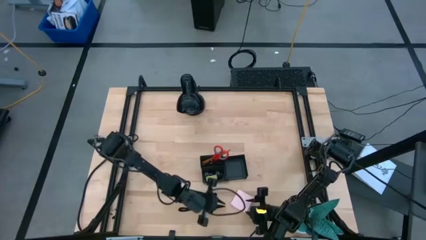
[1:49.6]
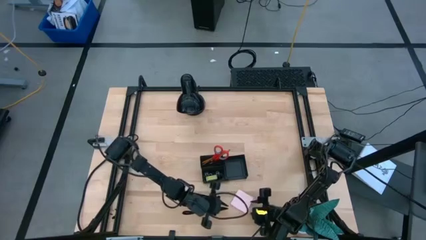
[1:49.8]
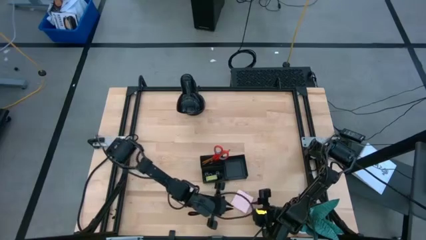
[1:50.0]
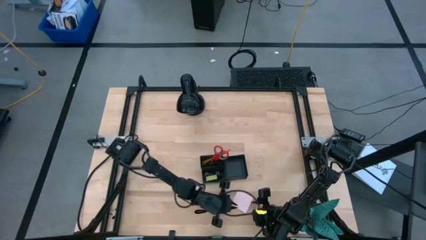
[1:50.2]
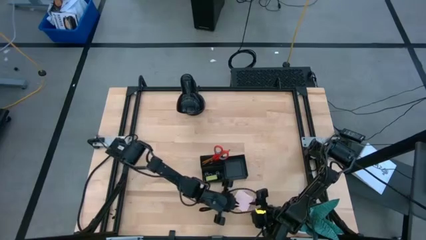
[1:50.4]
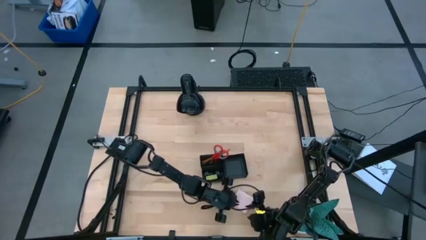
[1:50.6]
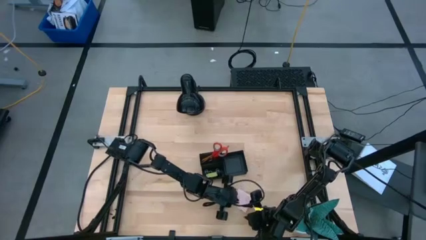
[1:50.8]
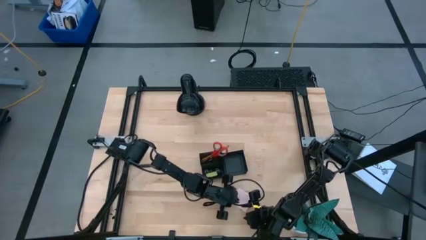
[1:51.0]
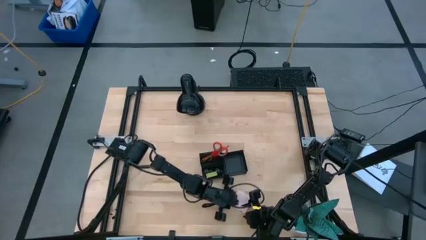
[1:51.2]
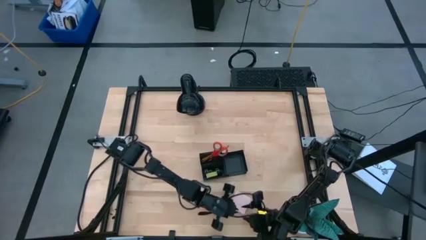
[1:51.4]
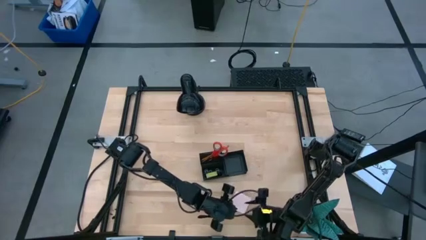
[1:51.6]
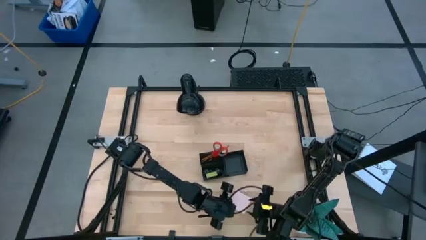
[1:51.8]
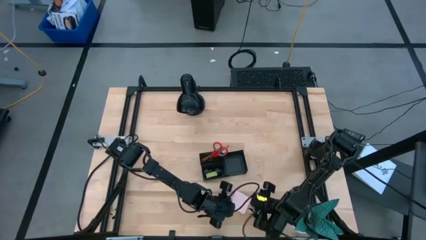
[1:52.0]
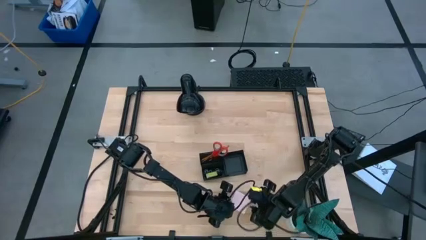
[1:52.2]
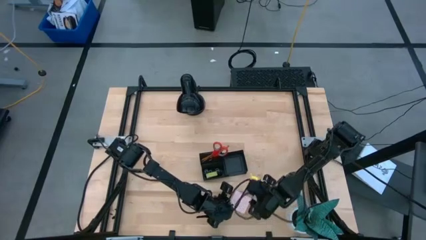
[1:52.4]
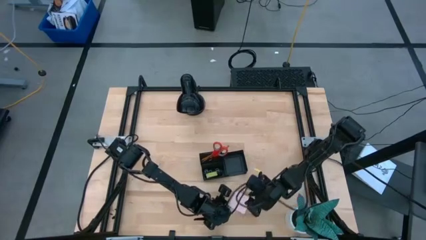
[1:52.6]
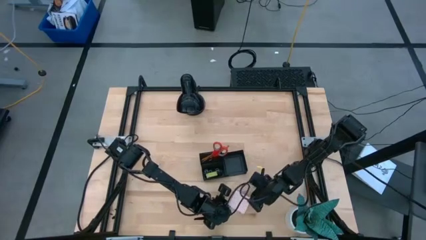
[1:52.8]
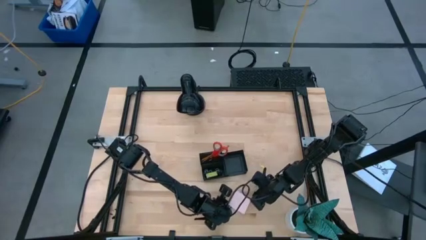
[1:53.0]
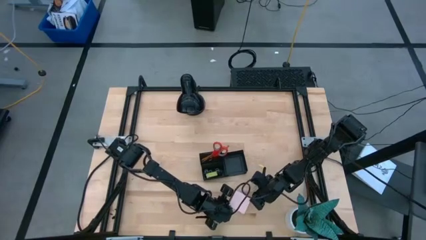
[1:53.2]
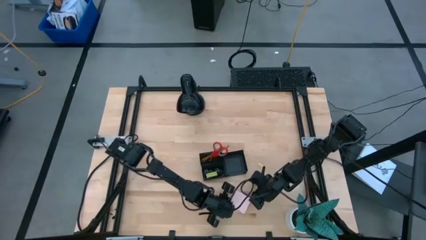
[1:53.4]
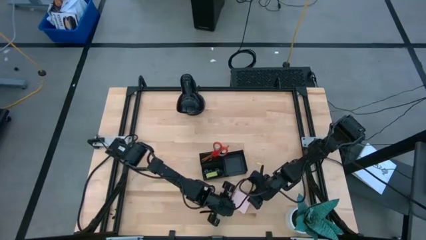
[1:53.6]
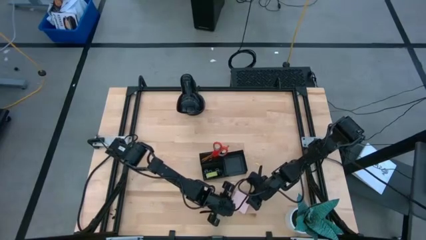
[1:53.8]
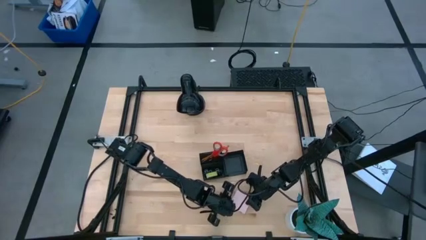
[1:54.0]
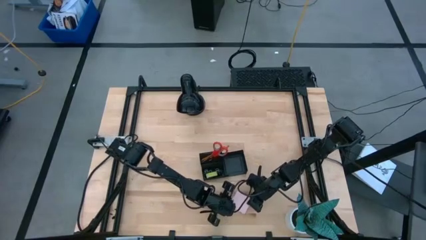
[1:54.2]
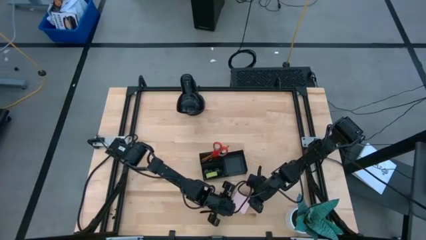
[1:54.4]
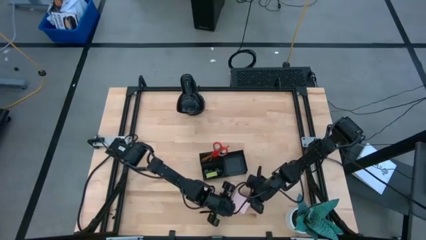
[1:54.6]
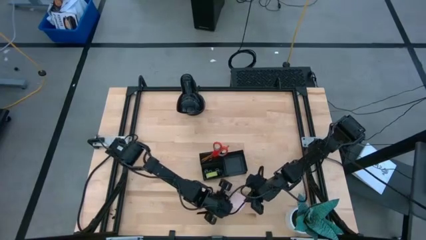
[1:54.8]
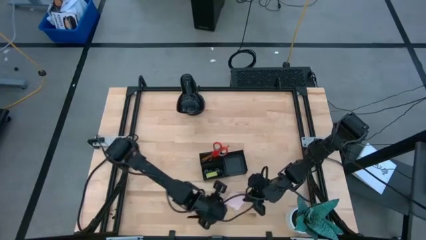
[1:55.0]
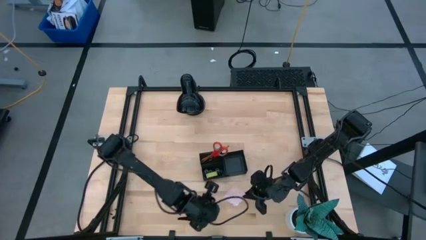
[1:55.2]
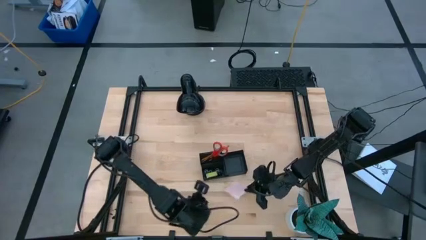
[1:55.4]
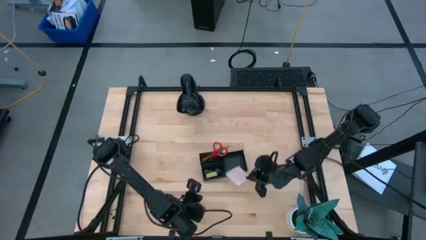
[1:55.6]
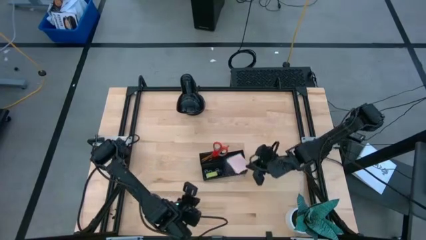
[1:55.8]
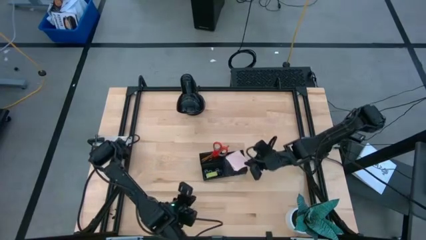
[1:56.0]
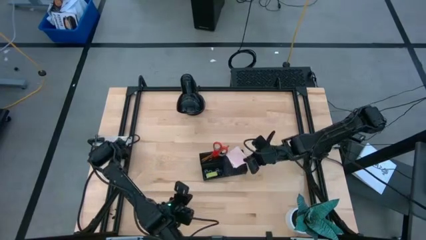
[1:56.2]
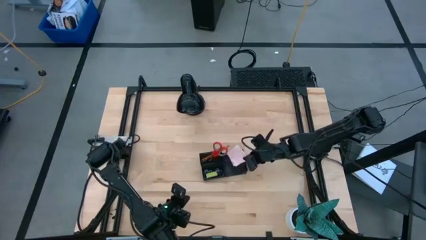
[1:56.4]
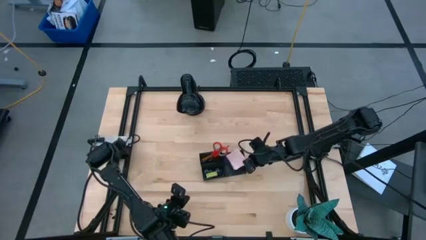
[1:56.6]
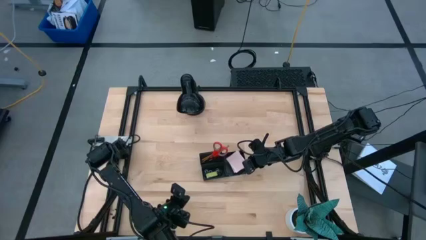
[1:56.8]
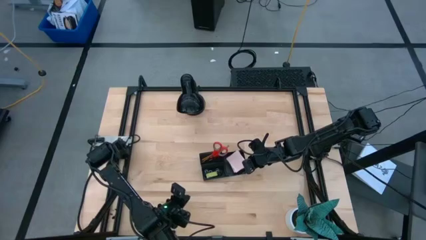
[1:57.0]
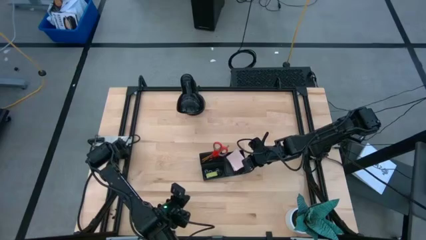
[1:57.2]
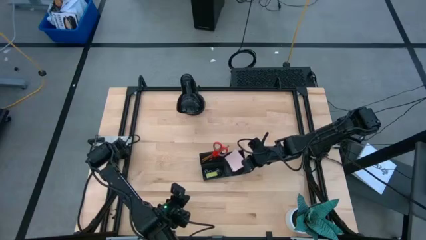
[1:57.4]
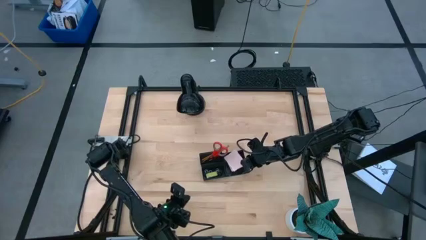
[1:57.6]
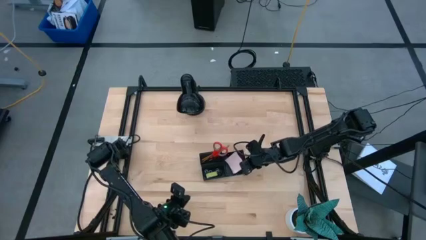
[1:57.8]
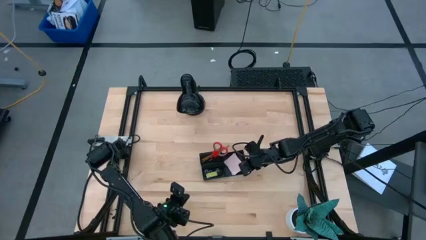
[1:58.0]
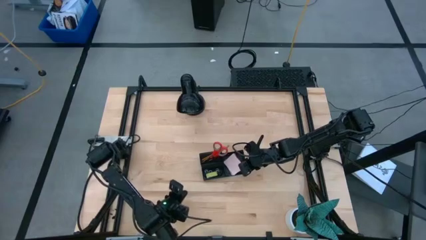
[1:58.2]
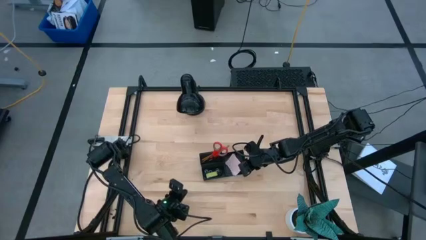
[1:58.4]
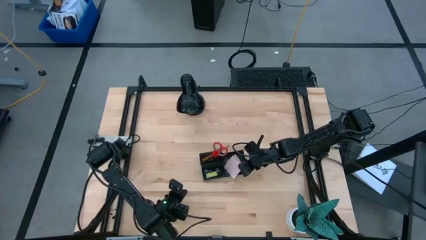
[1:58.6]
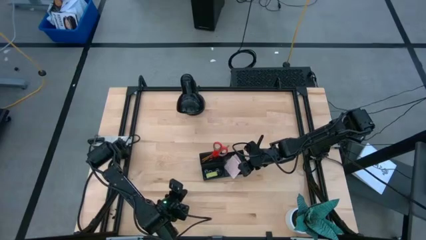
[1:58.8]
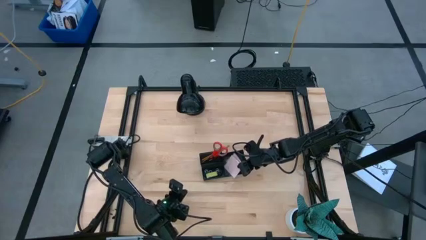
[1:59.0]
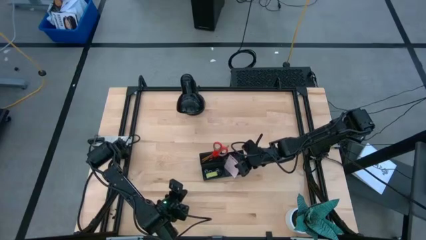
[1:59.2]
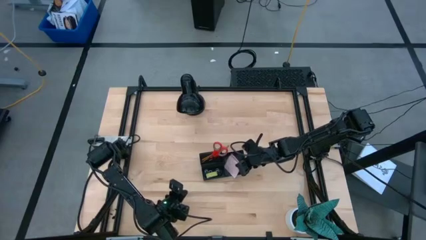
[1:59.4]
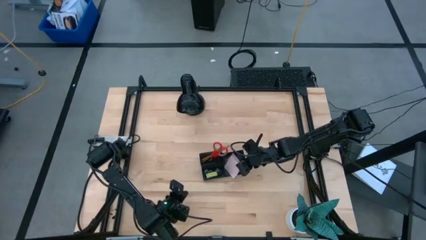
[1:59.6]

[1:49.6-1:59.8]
Task: Pick and place office supplies into organizer
Put the sticky note into the desk organizer

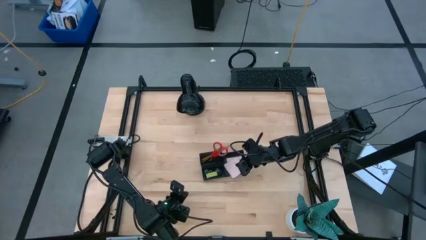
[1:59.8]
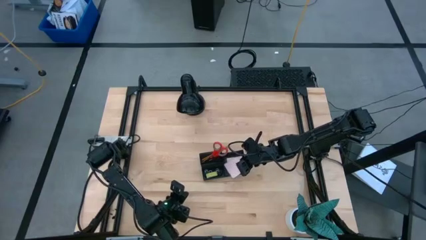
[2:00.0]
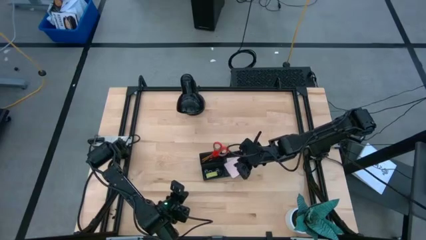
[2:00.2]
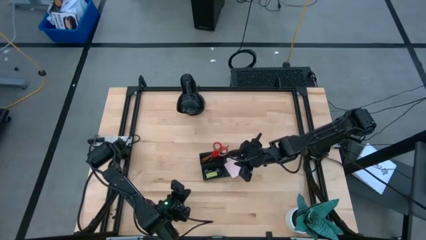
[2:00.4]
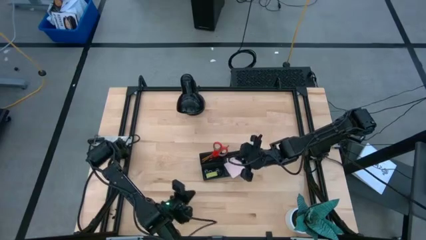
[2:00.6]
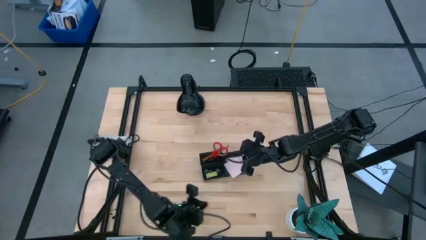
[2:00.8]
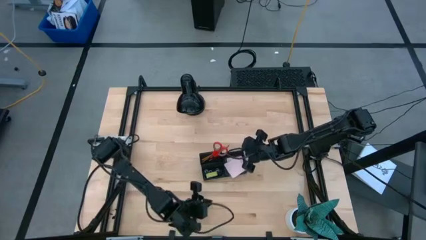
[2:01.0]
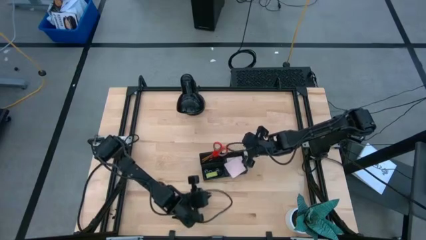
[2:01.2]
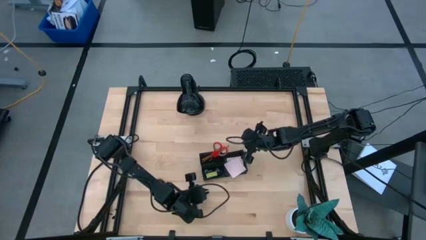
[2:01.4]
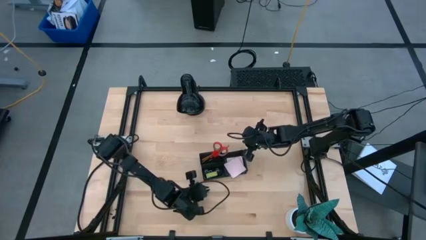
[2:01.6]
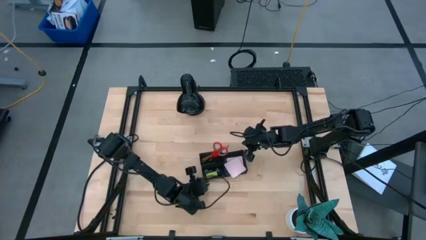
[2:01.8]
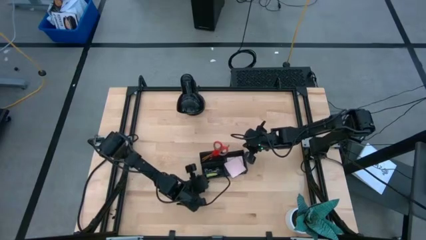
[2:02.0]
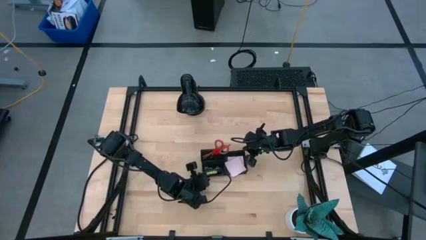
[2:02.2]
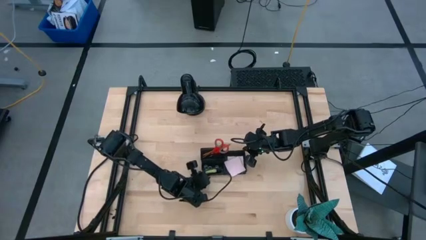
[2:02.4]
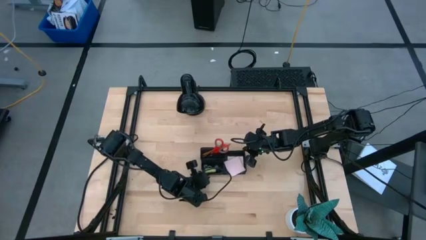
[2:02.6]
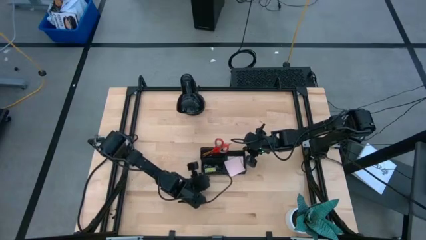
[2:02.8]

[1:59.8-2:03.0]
Adjust the desk organizer
